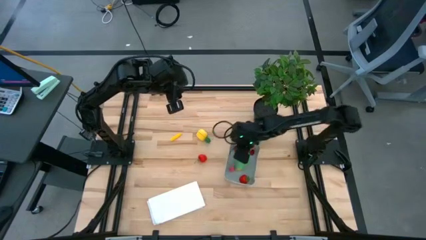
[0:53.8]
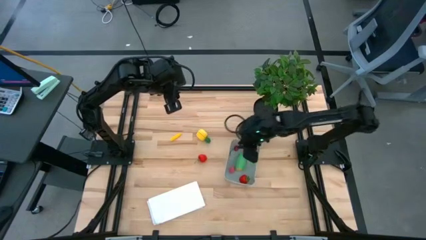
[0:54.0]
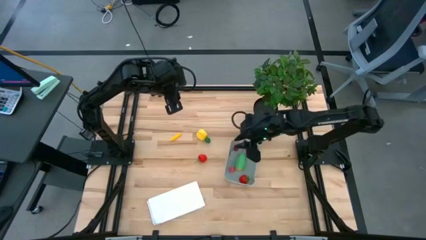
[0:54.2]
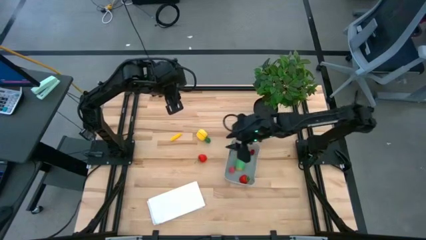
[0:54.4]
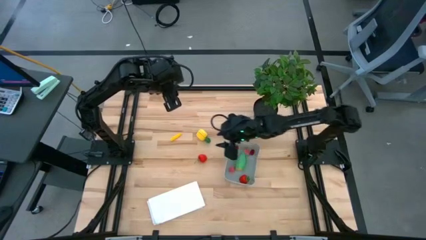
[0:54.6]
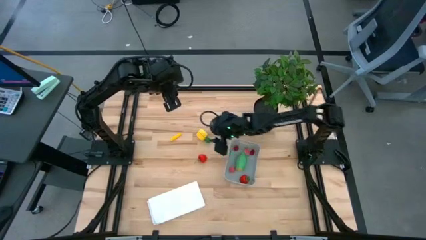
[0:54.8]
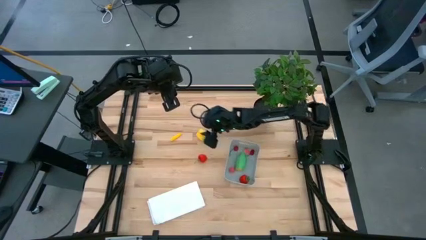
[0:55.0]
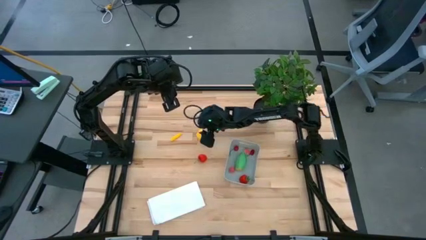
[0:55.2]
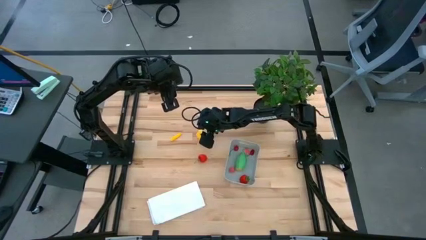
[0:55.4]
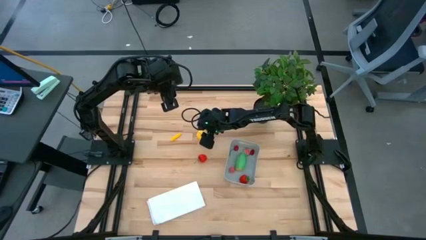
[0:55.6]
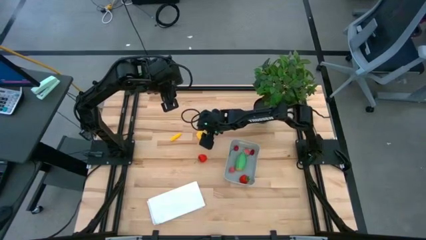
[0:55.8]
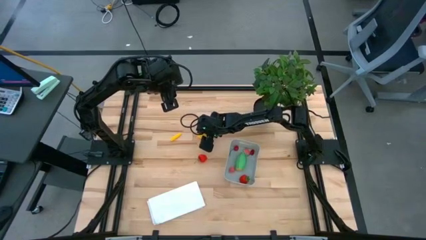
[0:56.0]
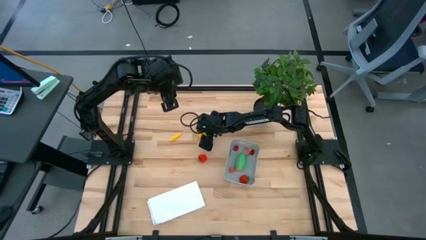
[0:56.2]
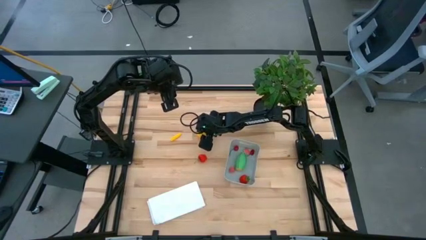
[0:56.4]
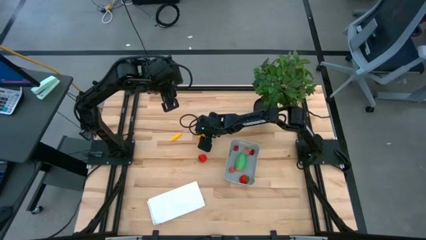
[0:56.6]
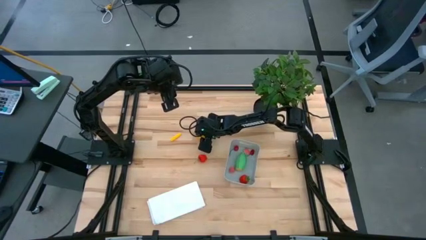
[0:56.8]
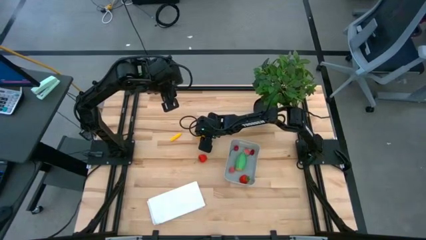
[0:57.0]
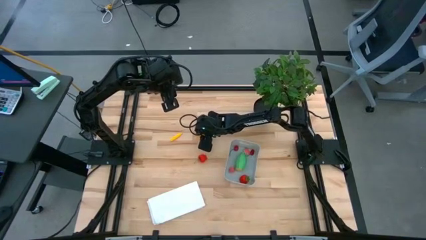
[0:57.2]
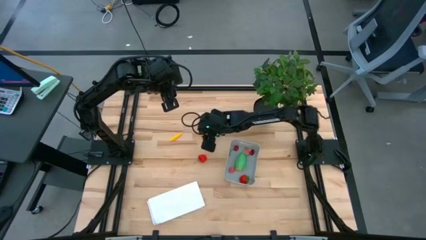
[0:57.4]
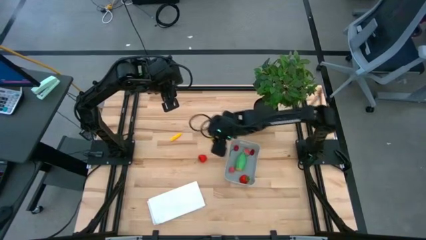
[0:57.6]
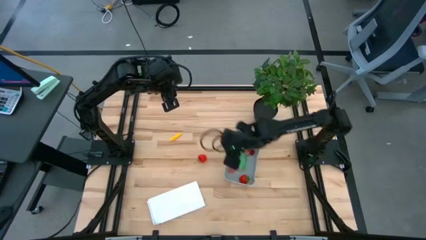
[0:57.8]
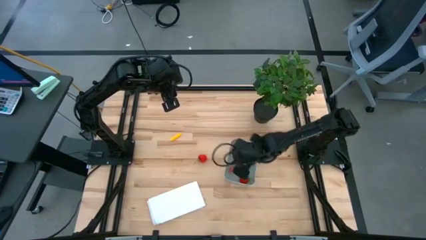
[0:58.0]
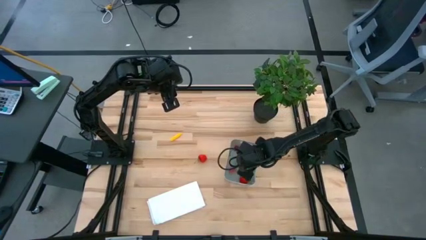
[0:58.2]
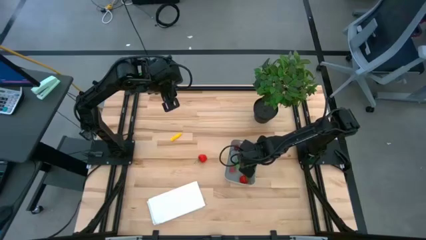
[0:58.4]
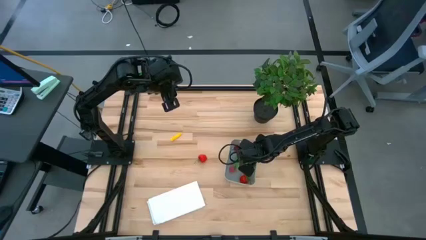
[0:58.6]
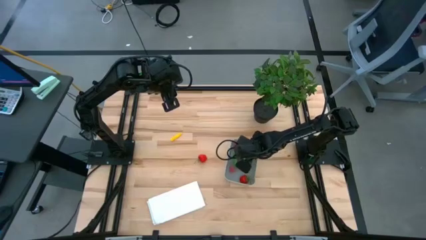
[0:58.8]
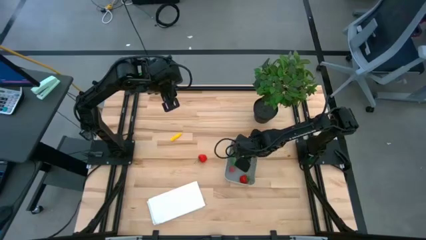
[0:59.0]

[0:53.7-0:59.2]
Task: Pick and placing Produce into tupperware
Put the yellow pineapple into the gray bin

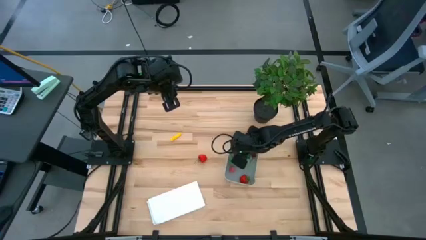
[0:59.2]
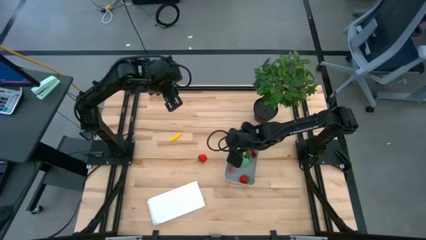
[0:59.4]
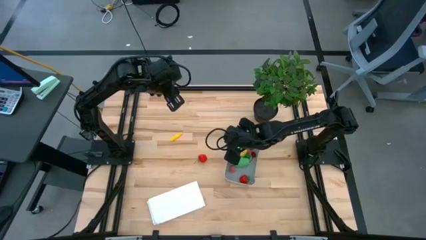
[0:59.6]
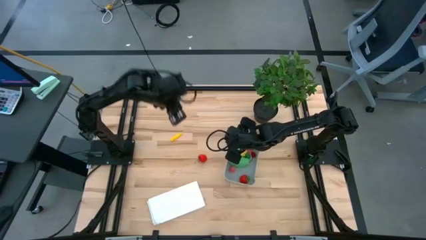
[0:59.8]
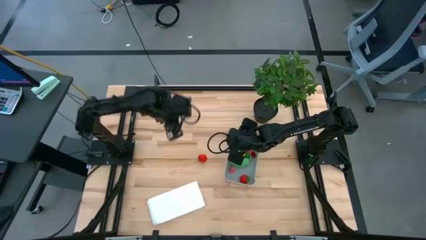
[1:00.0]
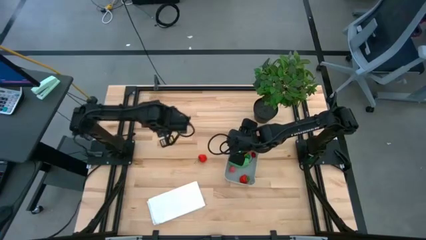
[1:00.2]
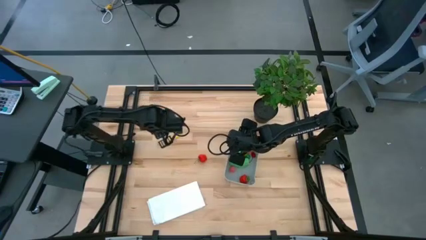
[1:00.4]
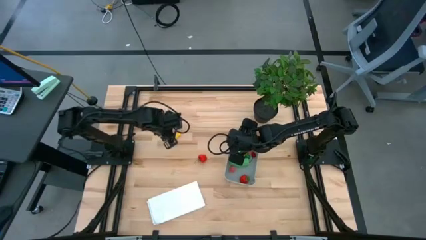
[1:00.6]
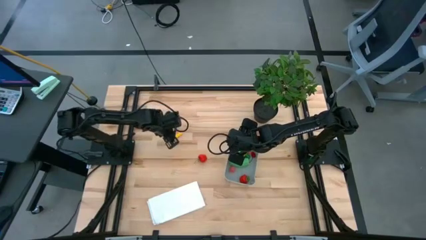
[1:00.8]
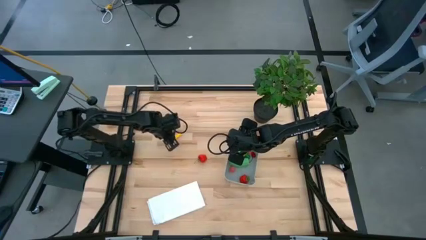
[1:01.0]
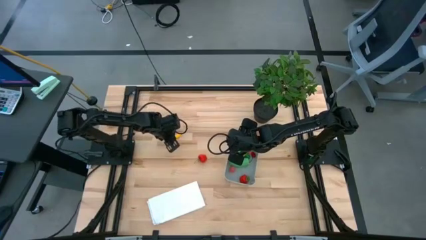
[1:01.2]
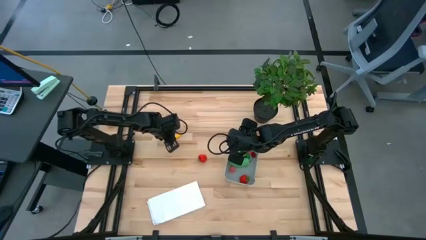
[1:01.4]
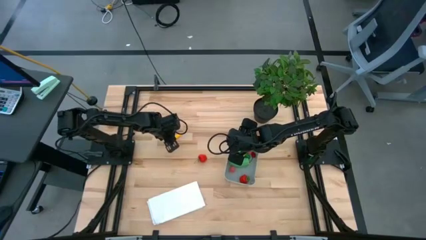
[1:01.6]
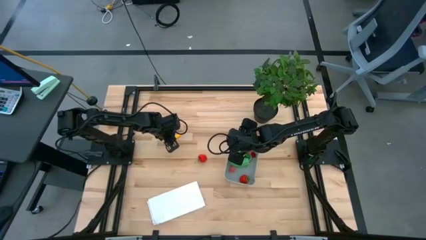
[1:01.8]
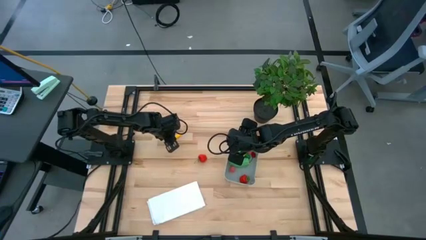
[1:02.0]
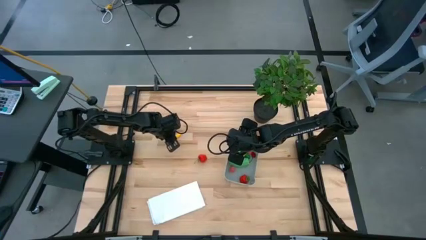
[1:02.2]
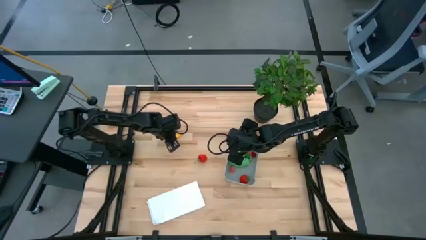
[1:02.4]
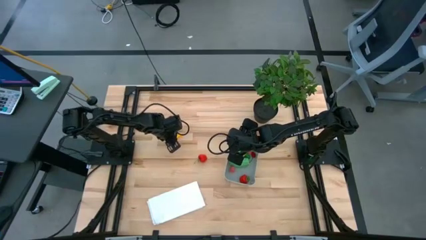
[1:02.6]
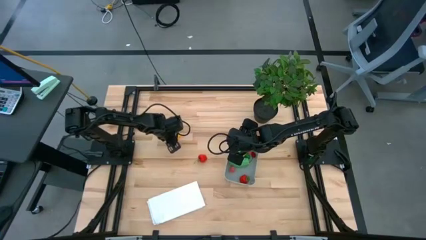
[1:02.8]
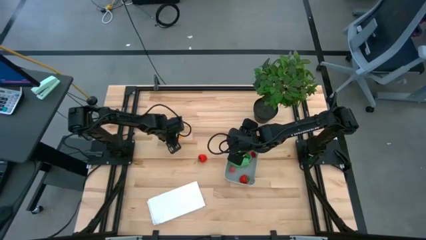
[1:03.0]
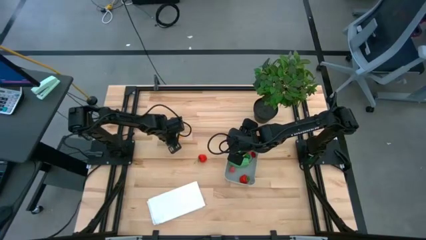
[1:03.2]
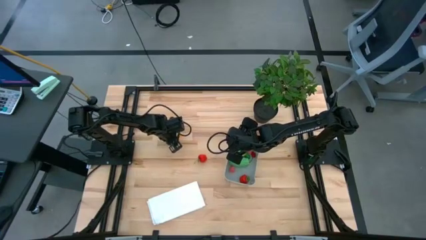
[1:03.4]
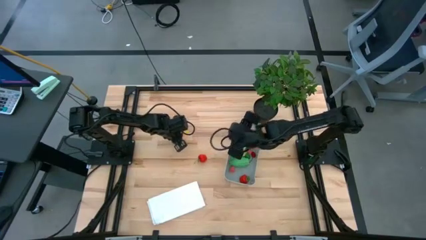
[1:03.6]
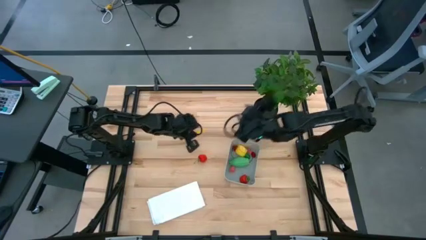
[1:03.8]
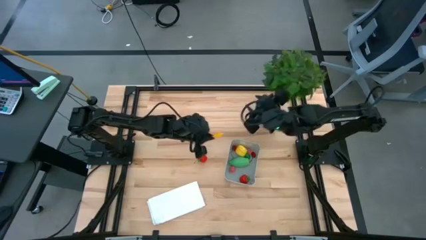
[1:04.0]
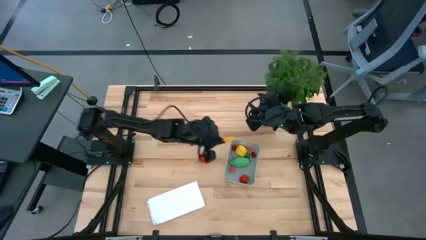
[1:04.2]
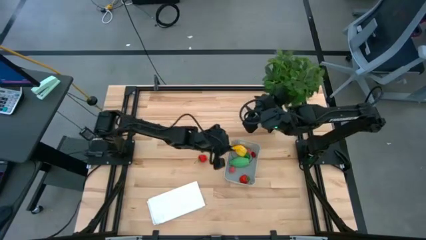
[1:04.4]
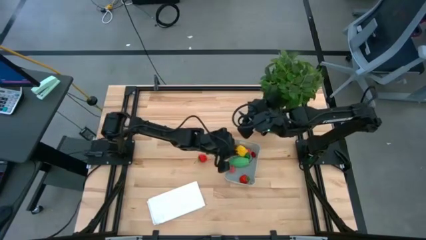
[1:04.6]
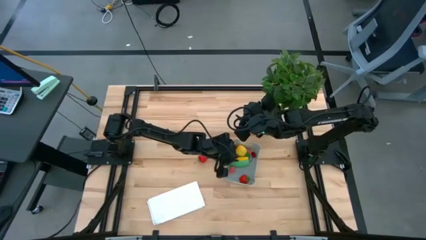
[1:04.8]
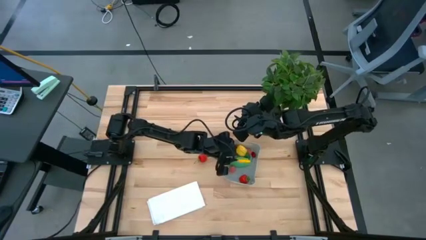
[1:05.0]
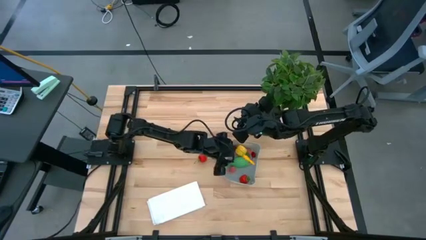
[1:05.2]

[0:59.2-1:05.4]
Put the yellow corn into the gray bin
